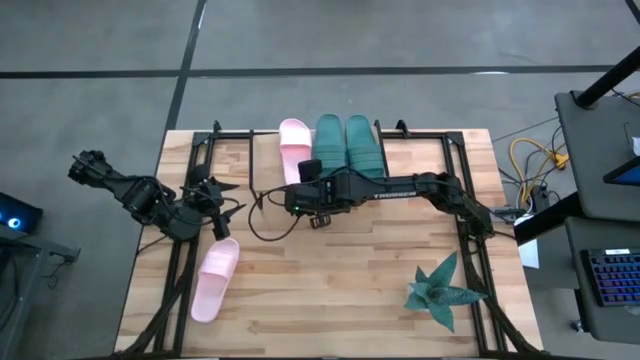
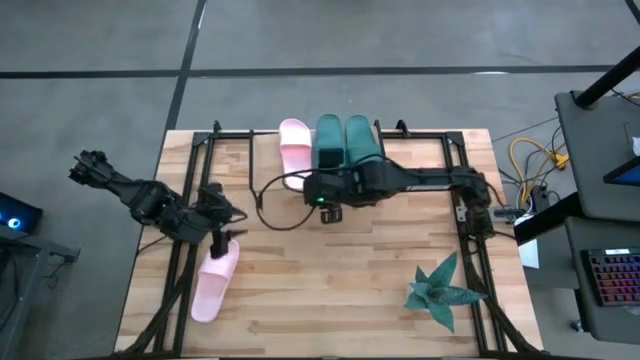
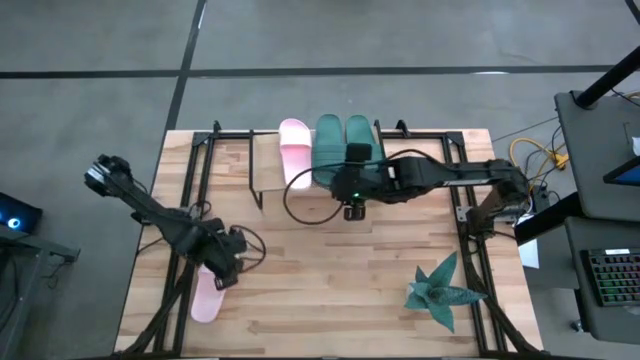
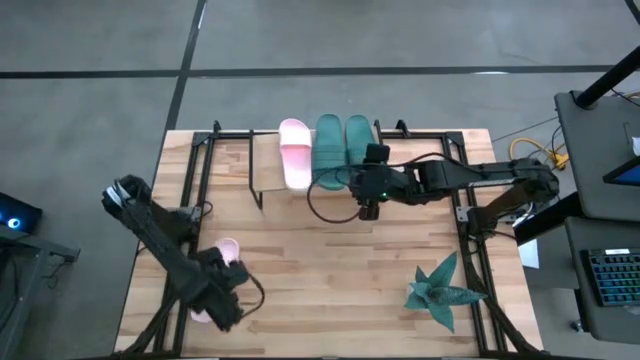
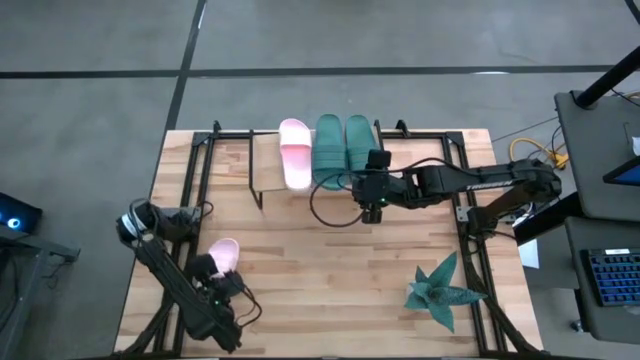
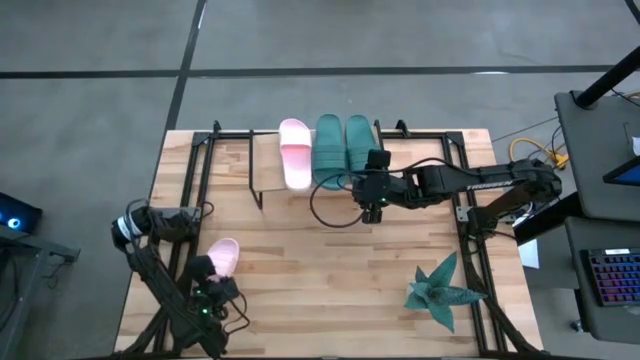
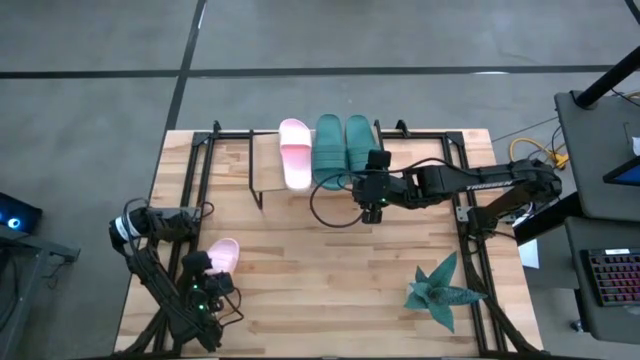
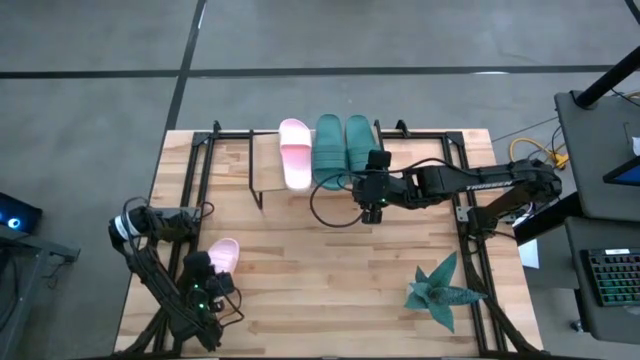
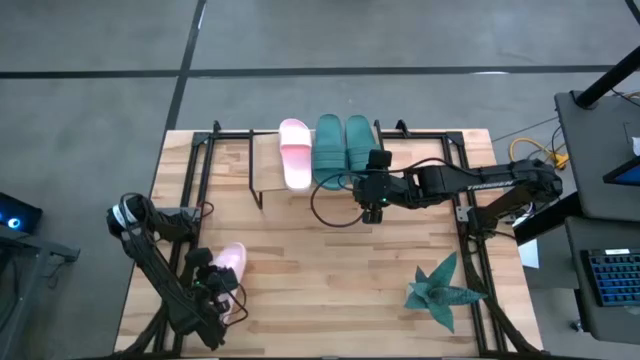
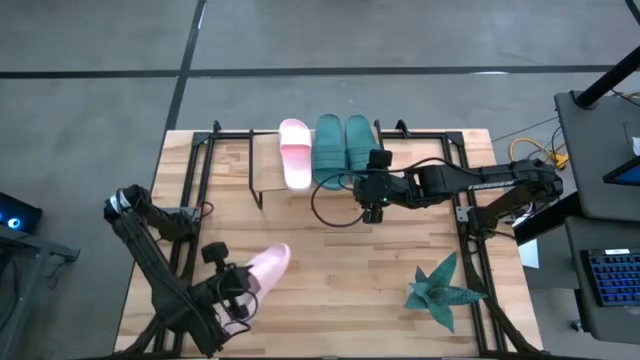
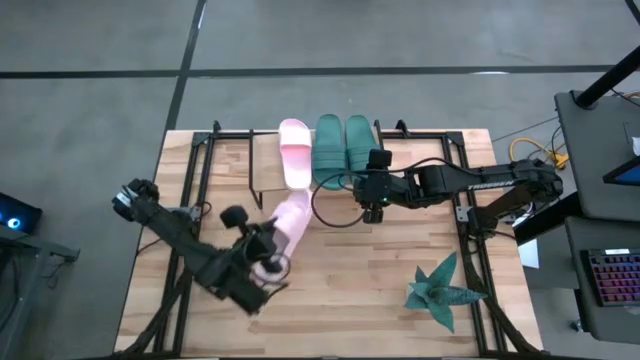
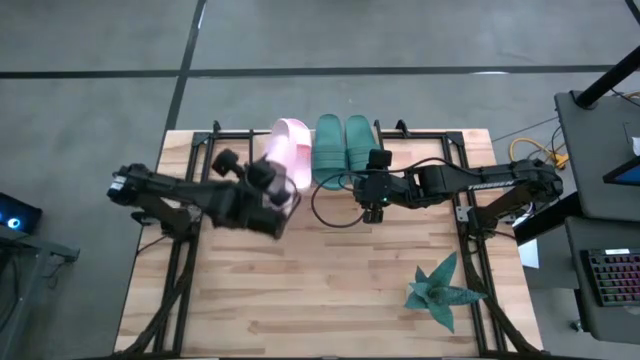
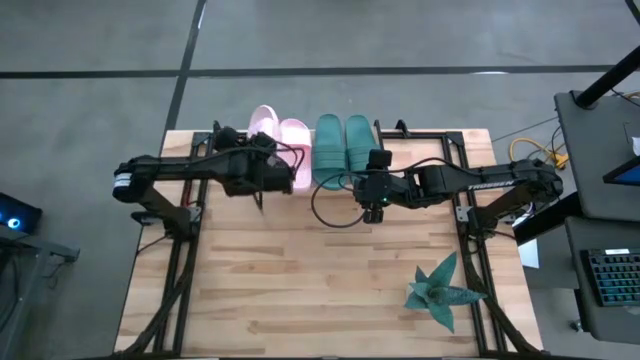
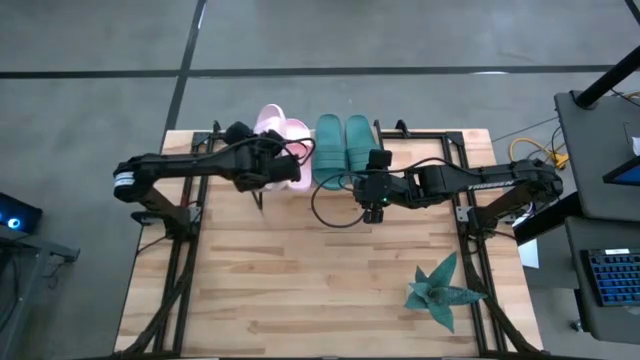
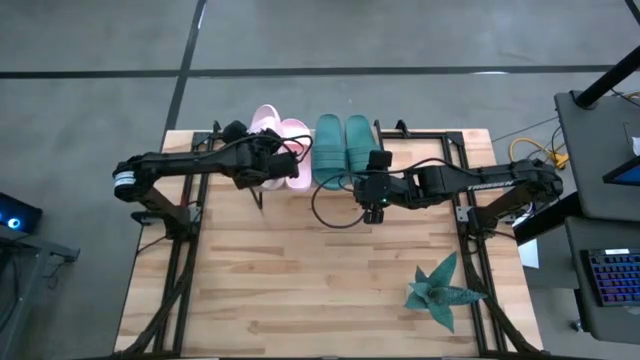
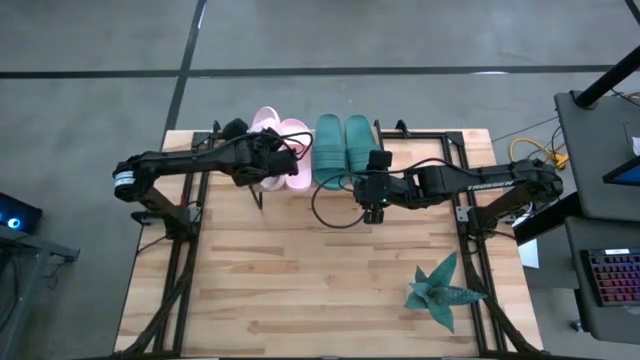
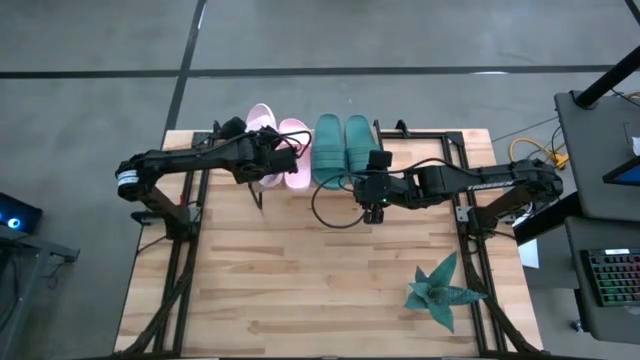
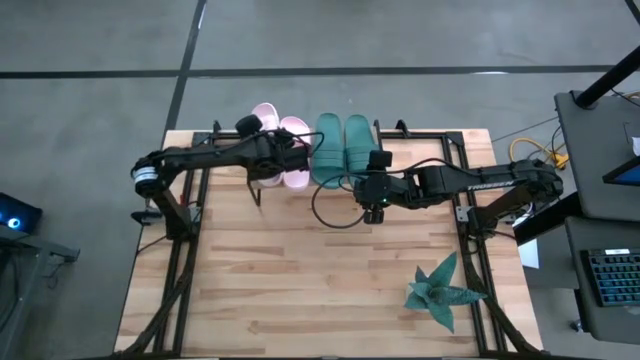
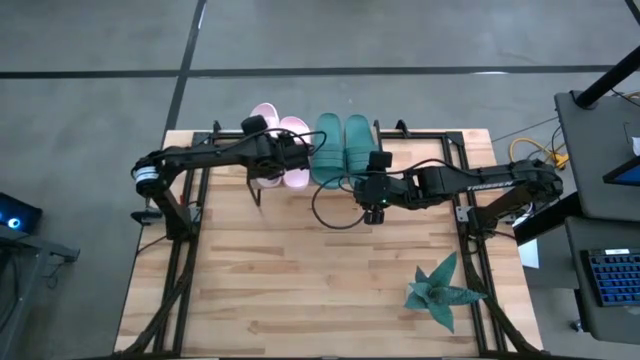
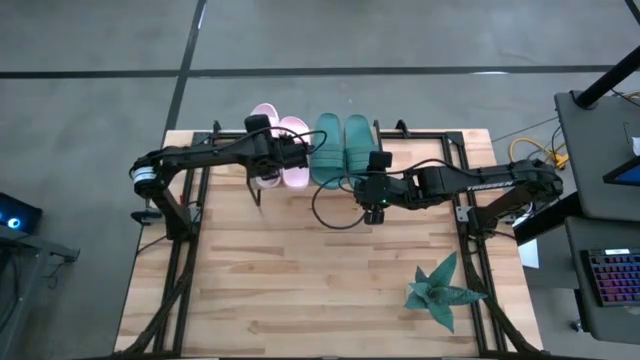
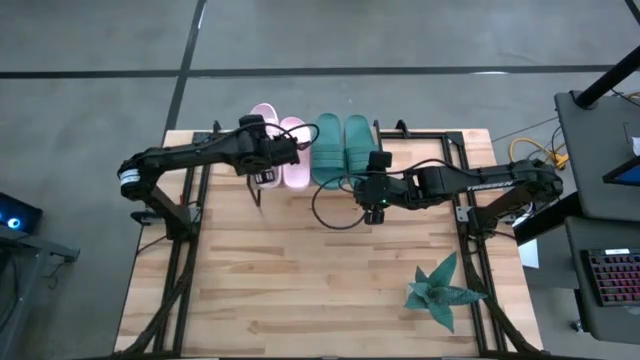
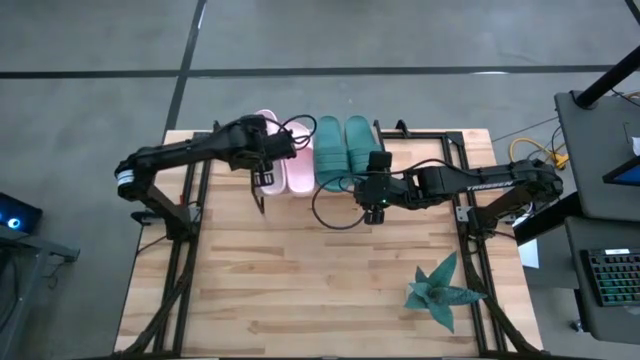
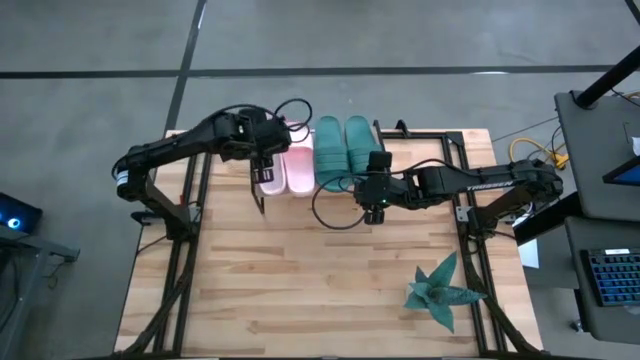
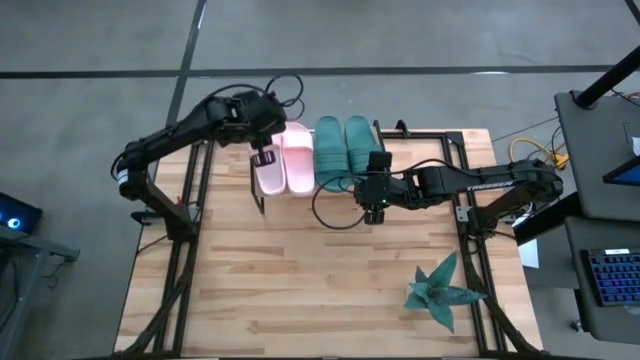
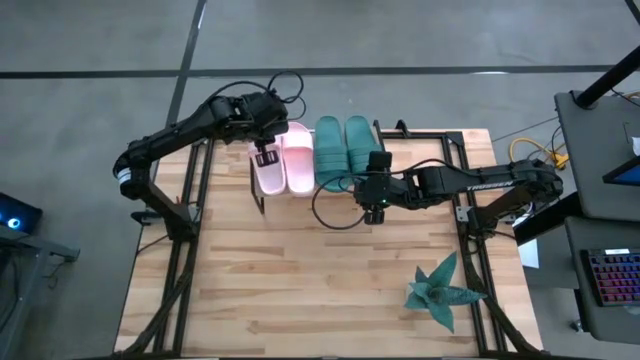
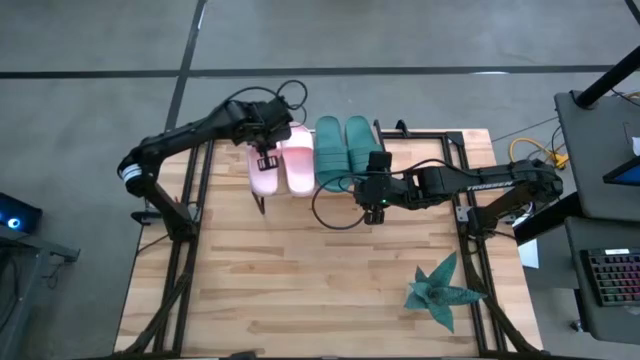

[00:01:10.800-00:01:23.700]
Task: Pick and place slides into the shelf
Put the pink slipper on the shelf

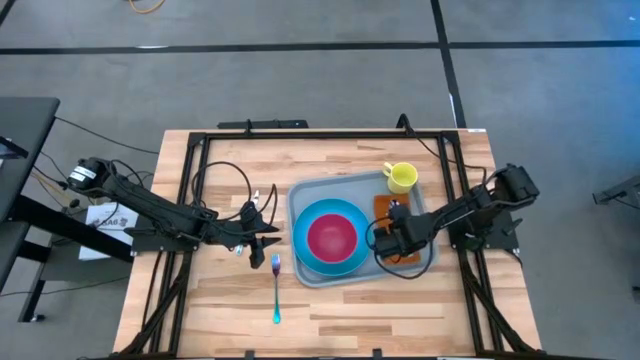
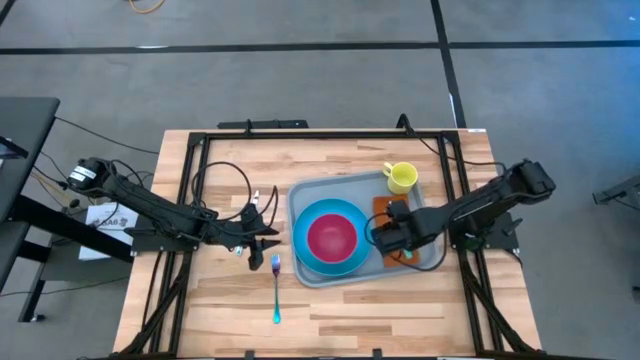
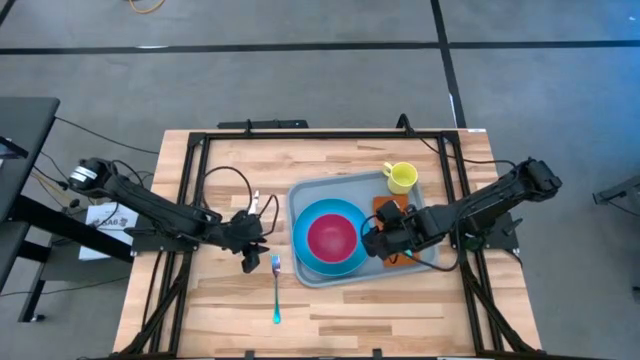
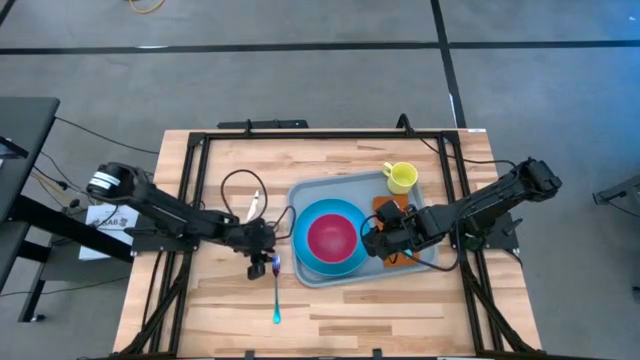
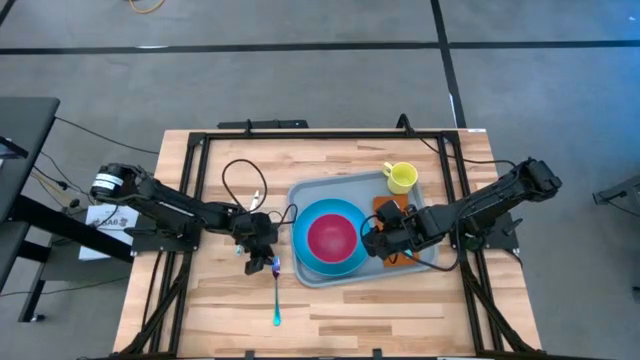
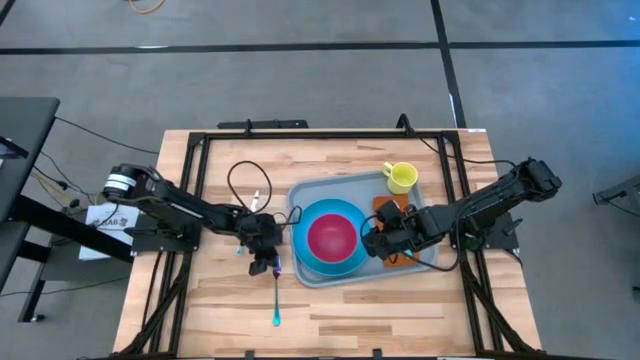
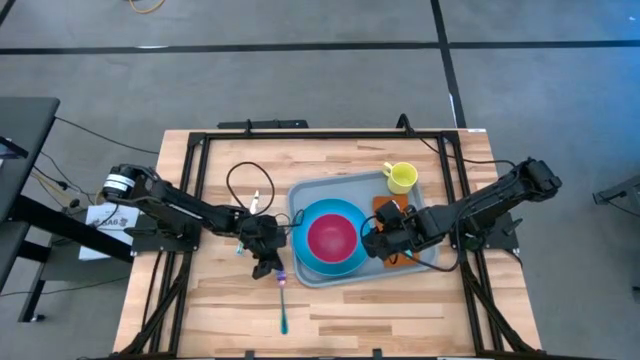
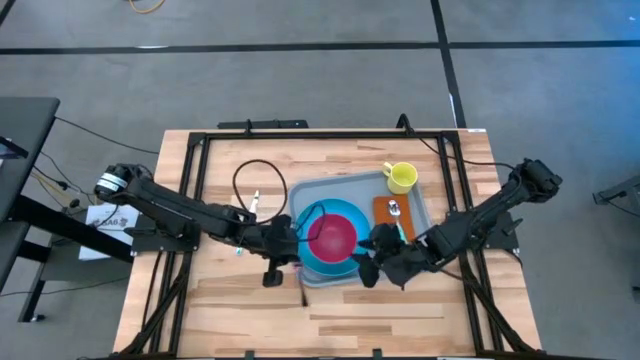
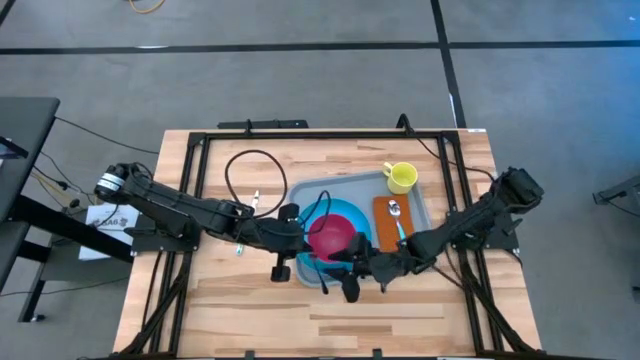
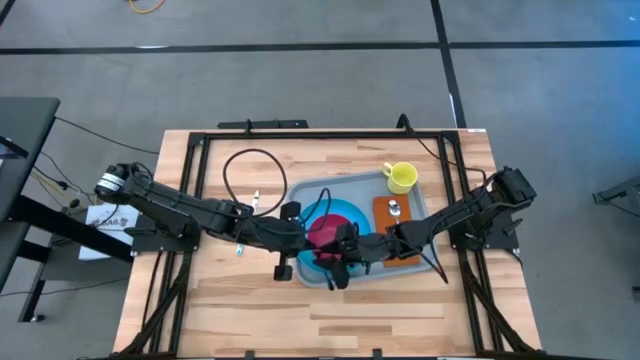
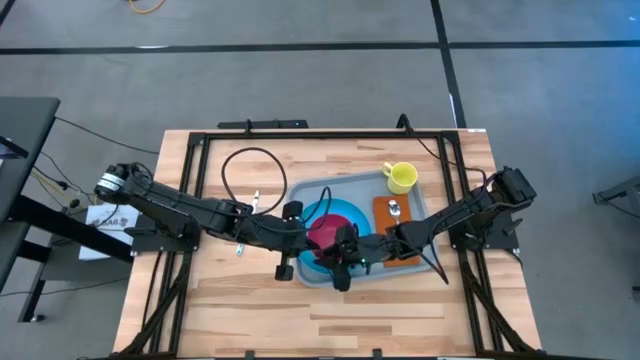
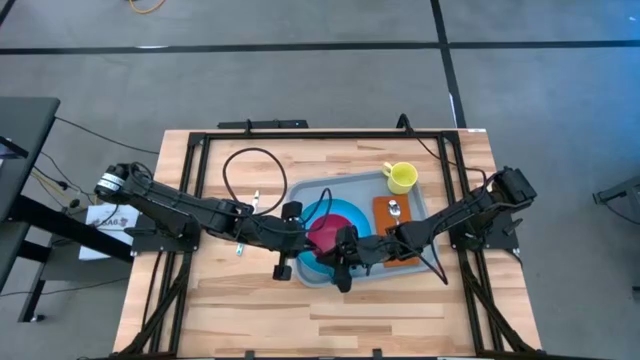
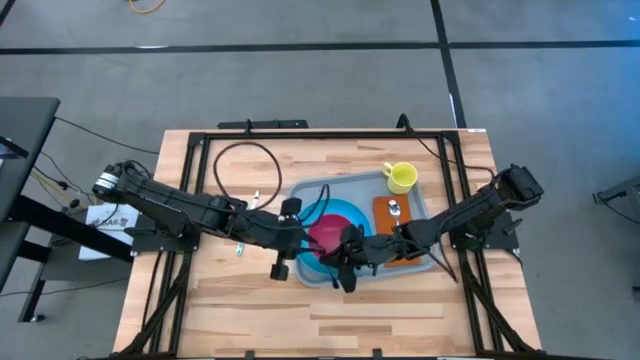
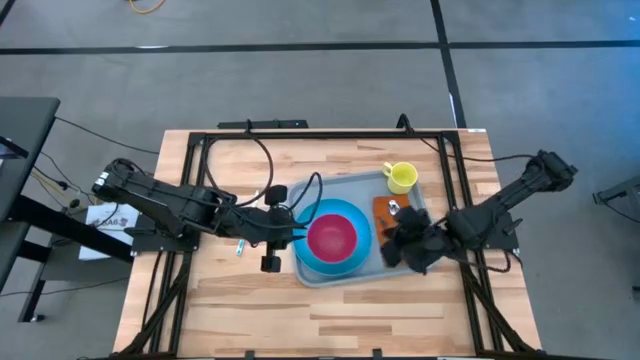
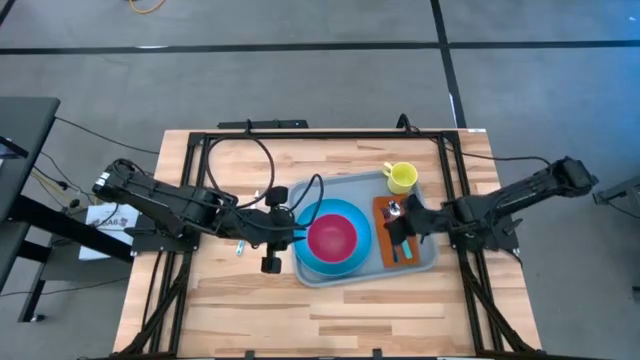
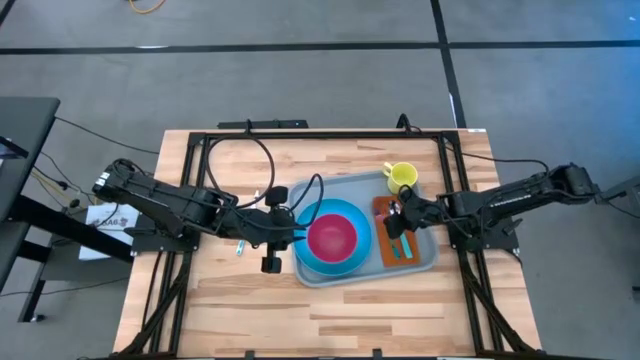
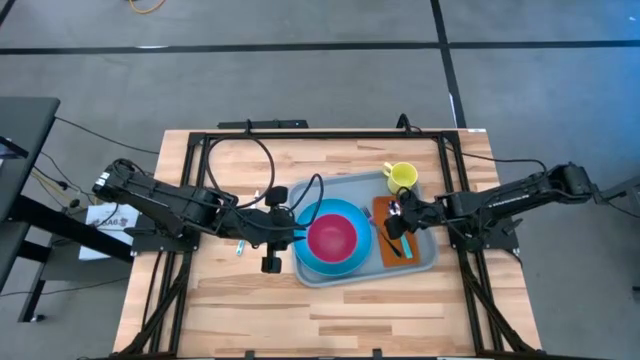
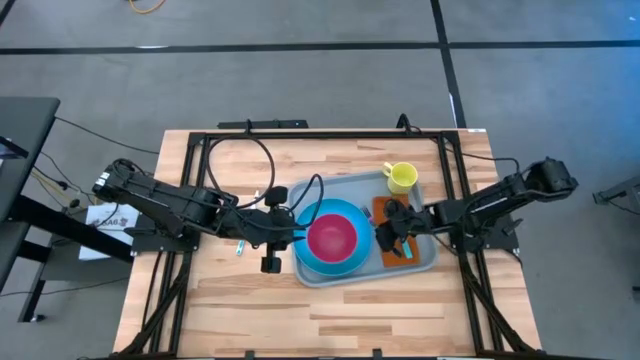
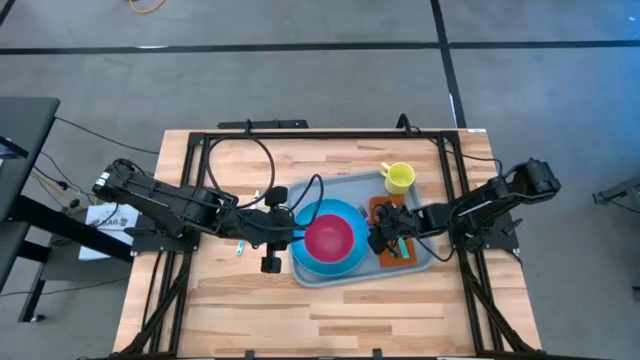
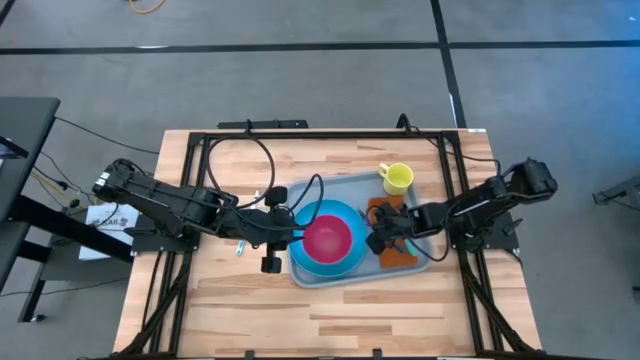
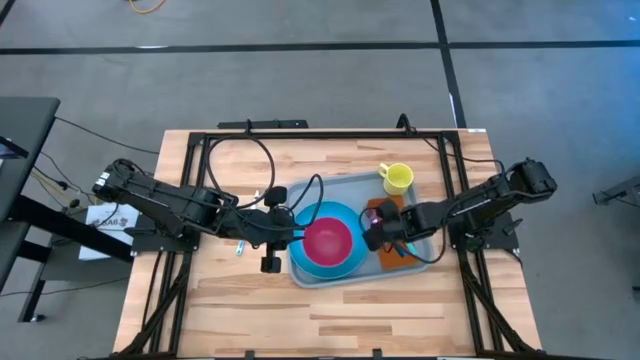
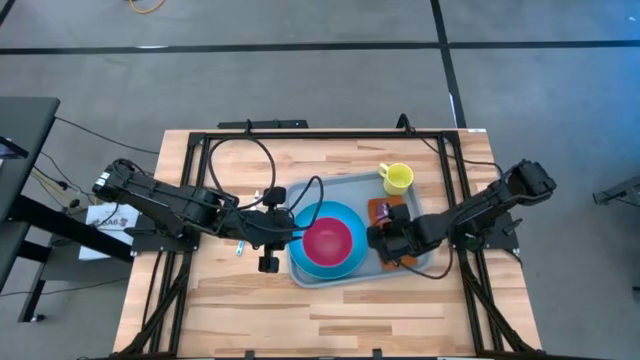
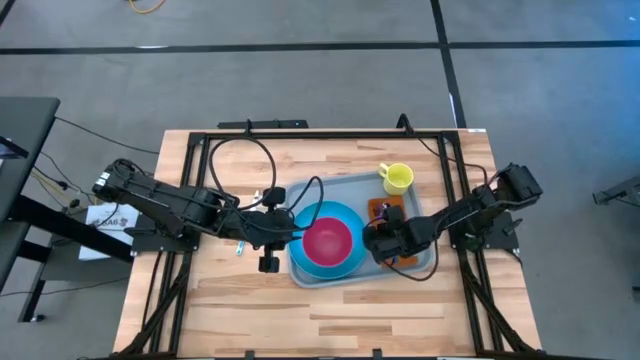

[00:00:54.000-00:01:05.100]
Task: Set up tray
Put the blue fork on the brown napkin to the left of the green spoon
